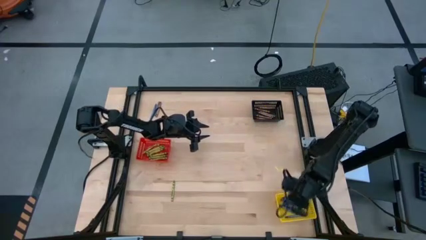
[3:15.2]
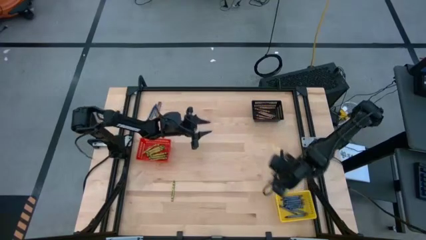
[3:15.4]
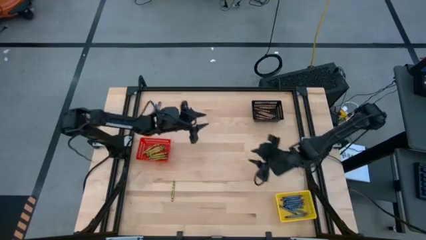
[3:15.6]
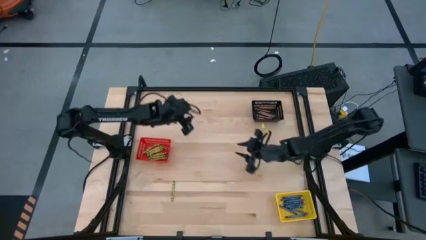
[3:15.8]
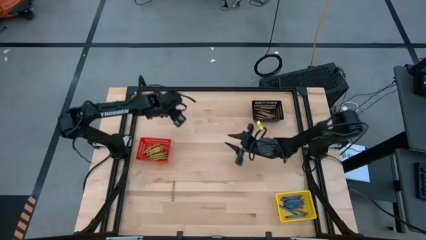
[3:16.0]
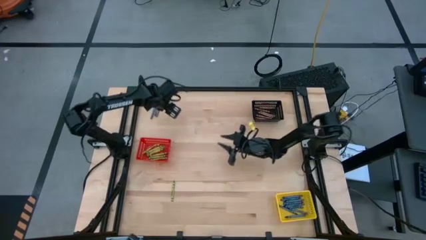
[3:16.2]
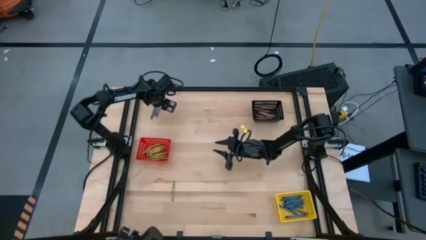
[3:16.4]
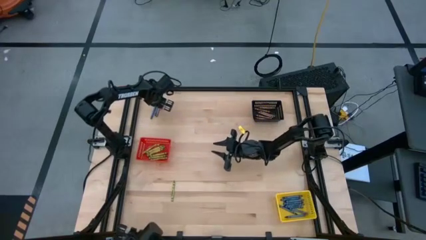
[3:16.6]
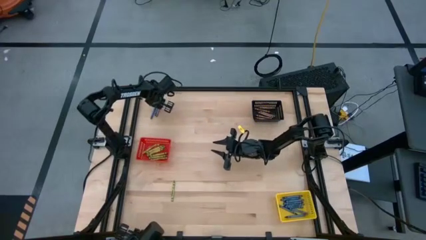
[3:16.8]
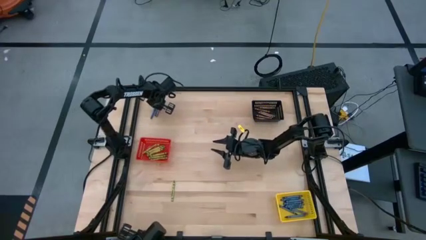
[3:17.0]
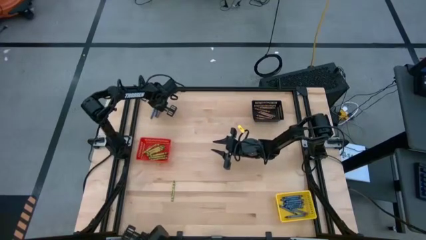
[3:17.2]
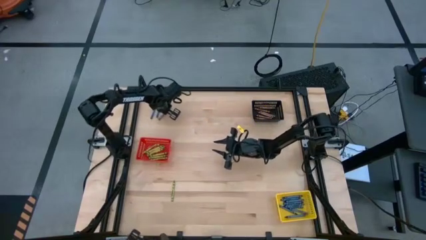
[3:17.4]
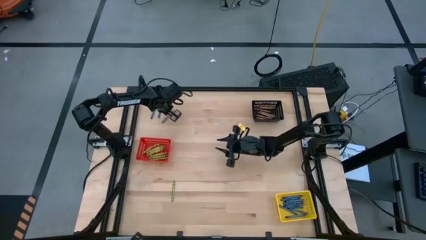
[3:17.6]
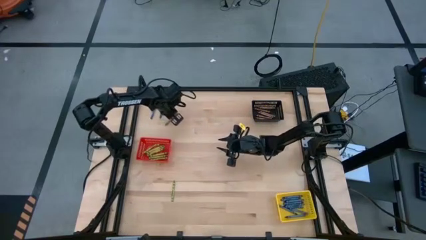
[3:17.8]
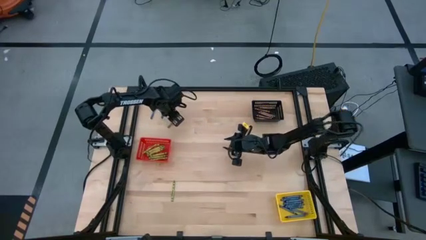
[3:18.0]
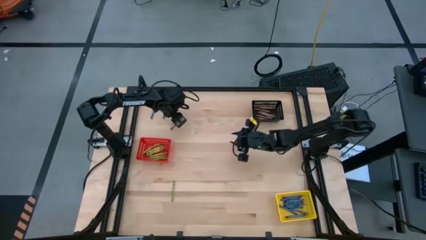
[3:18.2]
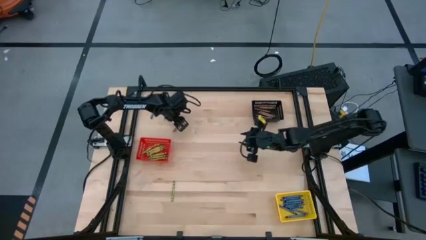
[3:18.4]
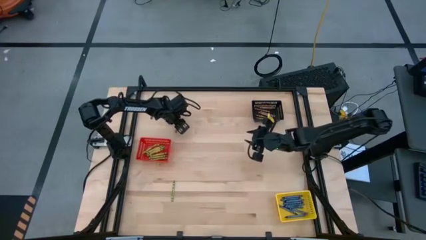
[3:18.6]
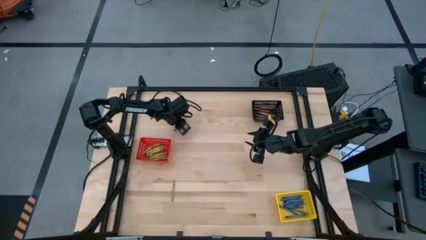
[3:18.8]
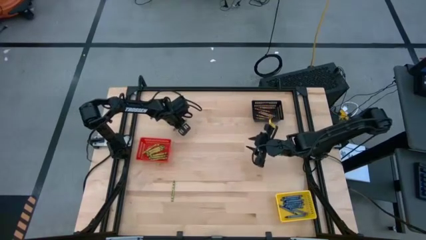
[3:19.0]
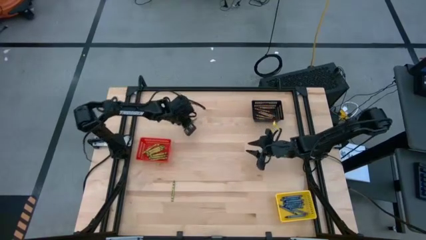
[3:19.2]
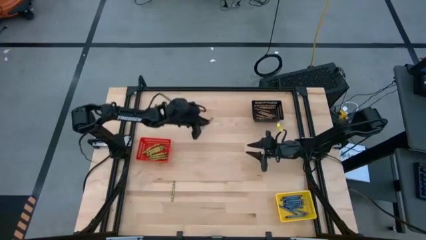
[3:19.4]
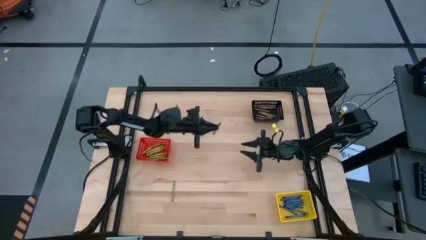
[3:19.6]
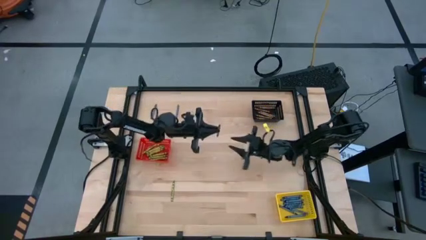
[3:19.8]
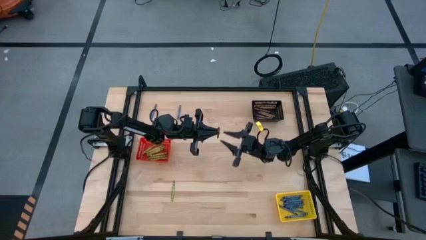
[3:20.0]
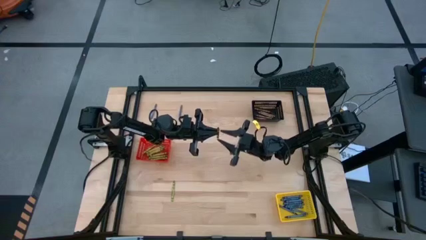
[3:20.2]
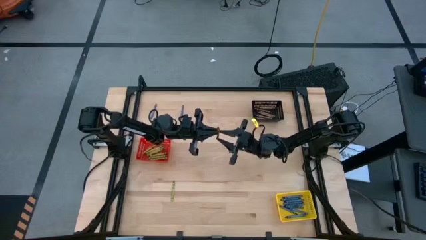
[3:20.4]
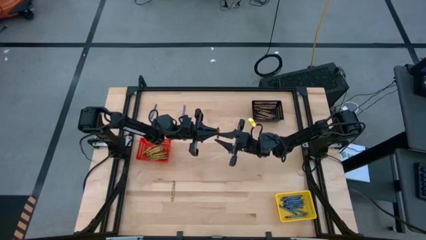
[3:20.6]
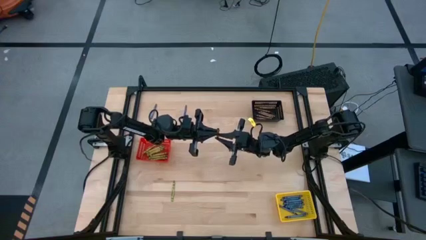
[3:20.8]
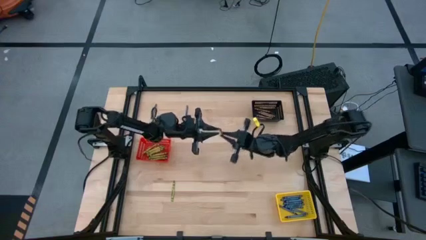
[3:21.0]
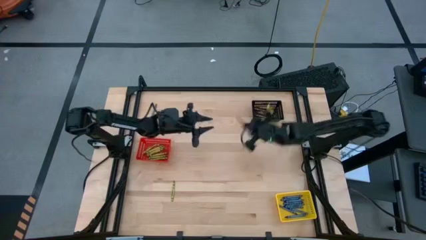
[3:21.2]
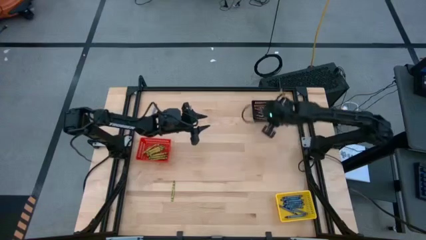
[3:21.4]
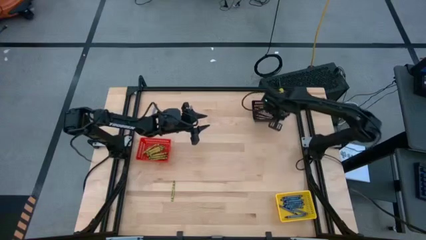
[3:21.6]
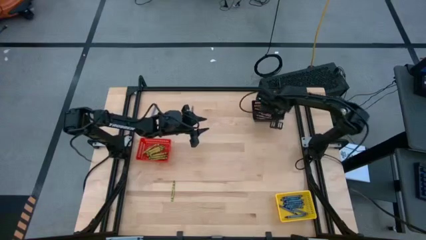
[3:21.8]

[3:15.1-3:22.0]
Task: Sort crayons
Put the brown crayon into the black bin

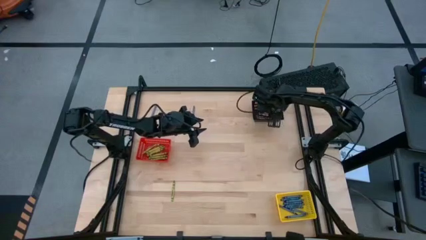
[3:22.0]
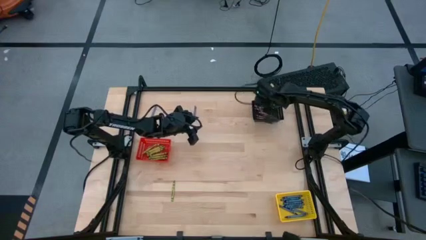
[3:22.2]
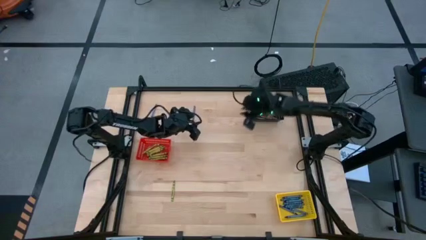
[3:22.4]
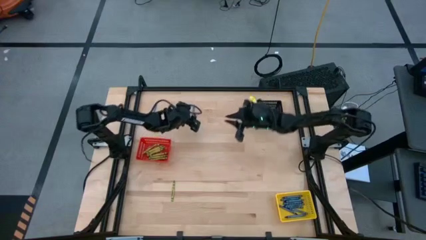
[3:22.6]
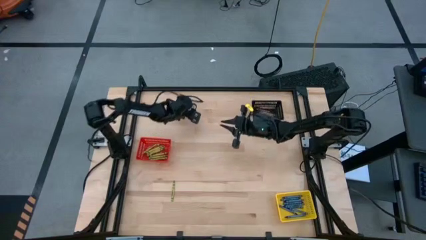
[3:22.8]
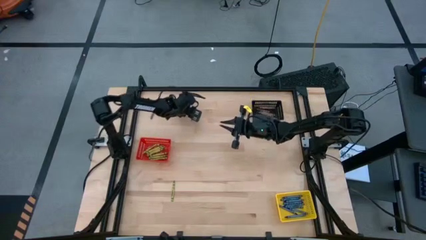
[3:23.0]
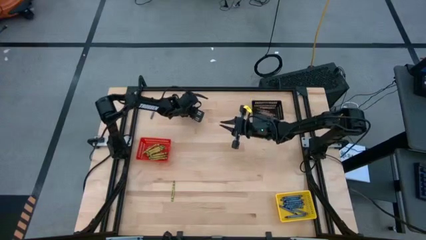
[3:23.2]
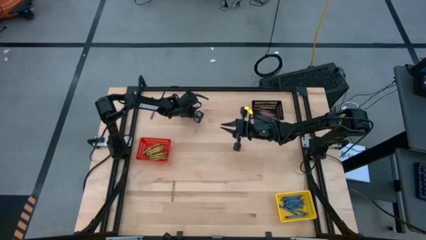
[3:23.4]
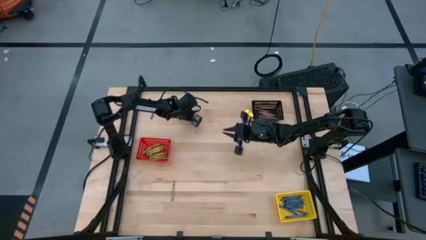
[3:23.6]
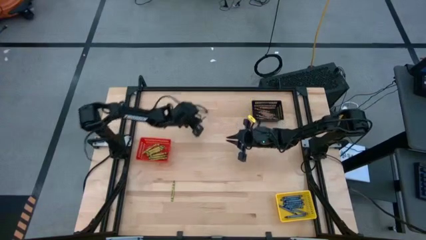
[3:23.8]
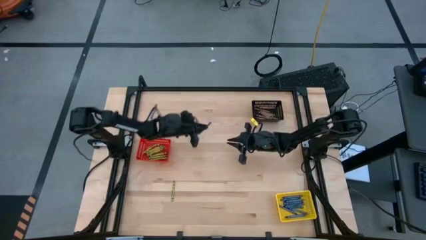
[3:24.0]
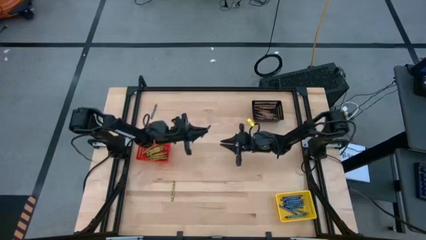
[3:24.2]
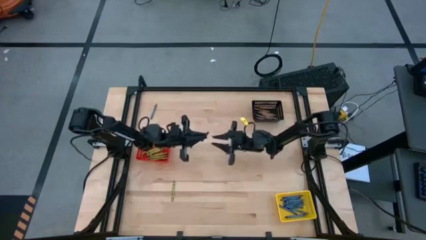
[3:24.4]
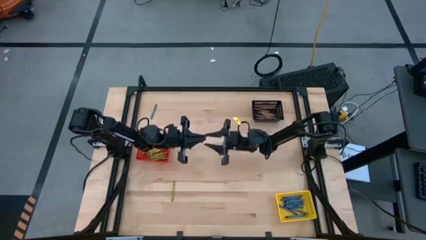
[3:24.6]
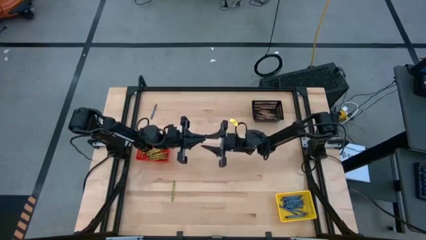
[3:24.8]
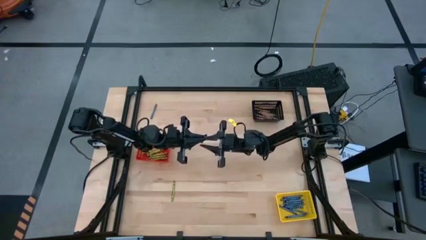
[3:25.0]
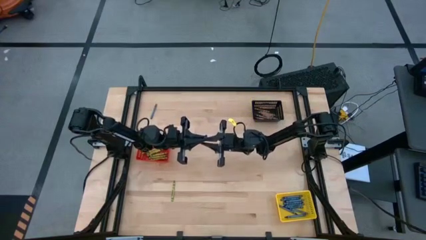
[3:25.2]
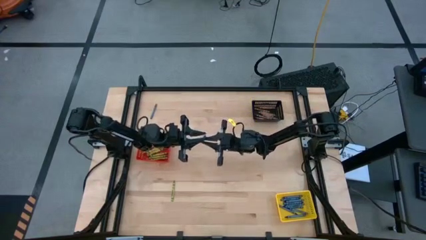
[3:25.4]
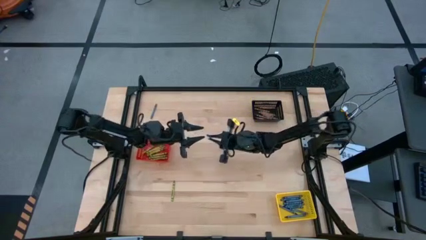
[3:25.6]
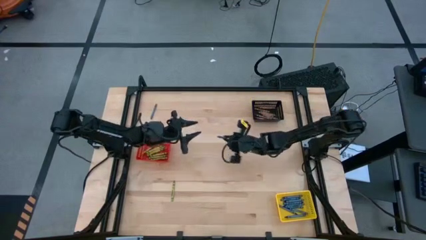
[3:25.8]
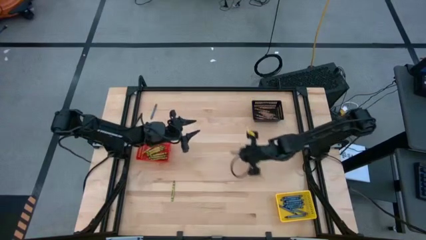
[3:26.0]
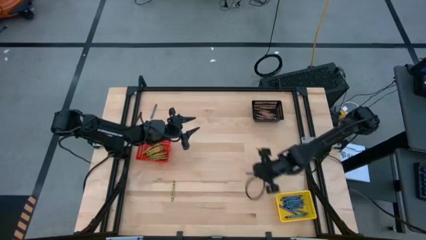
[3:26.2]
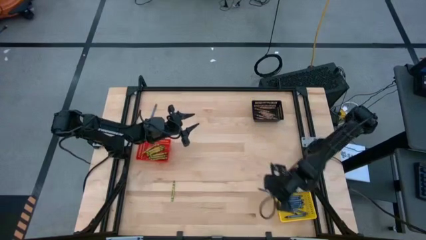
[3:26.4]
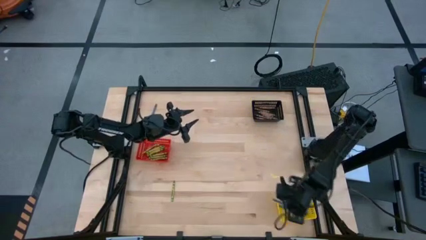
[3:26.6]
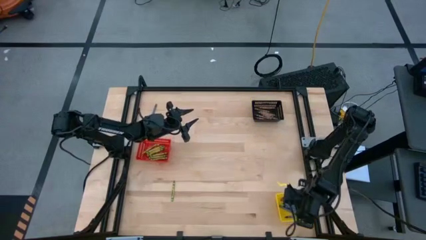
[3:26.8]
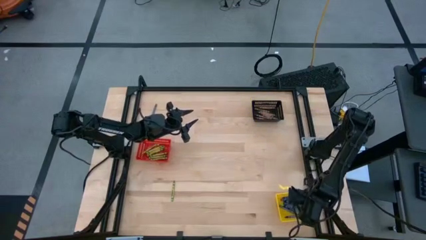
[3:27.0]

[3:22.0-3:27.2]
Put the right blue crayon into the yellow bin

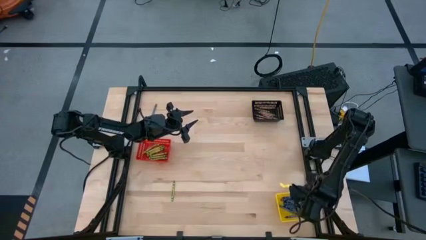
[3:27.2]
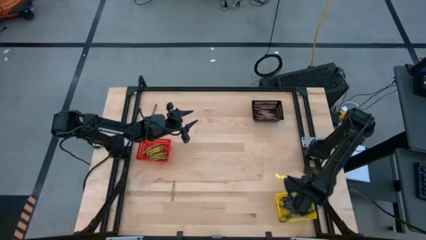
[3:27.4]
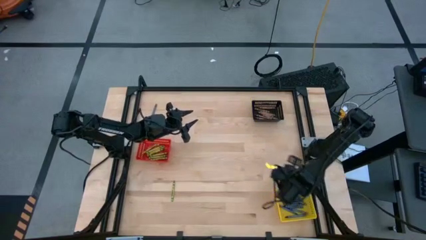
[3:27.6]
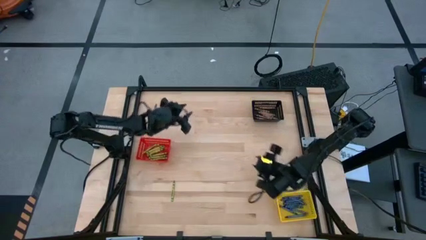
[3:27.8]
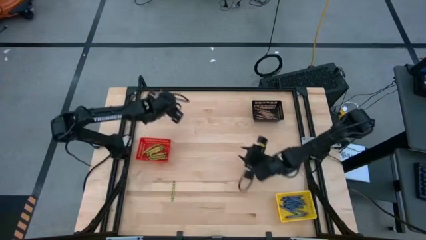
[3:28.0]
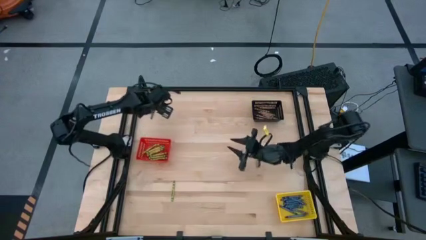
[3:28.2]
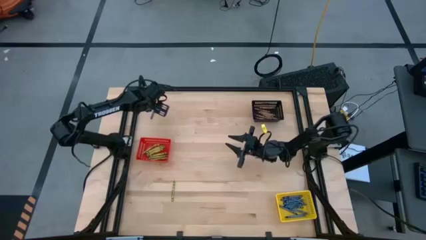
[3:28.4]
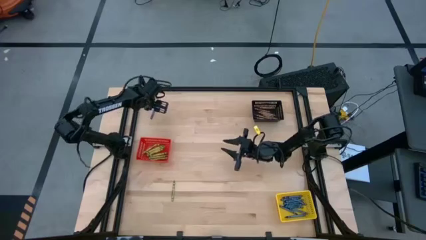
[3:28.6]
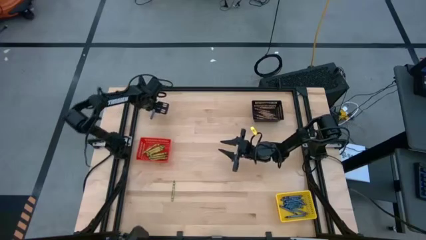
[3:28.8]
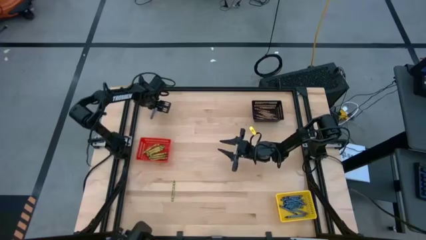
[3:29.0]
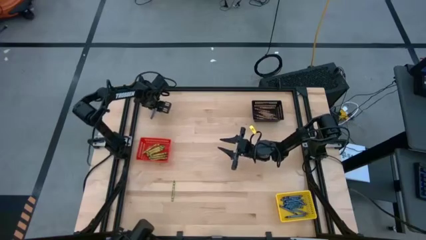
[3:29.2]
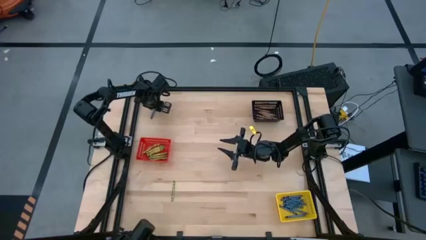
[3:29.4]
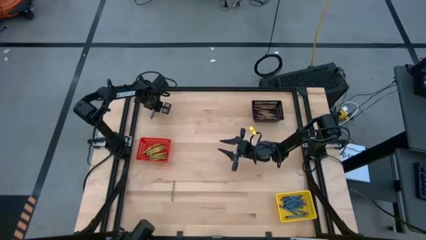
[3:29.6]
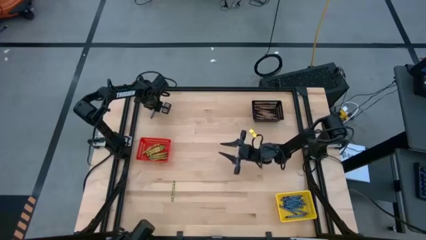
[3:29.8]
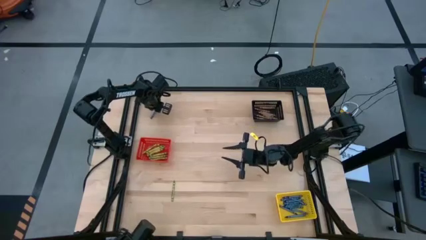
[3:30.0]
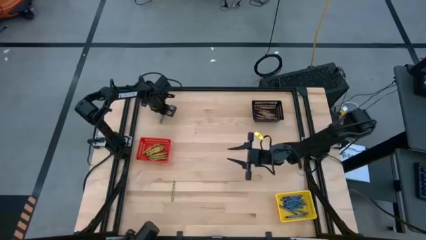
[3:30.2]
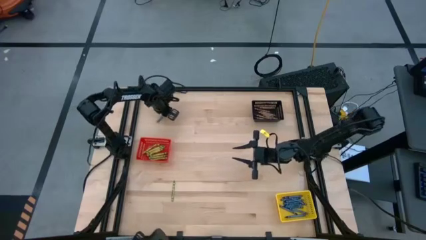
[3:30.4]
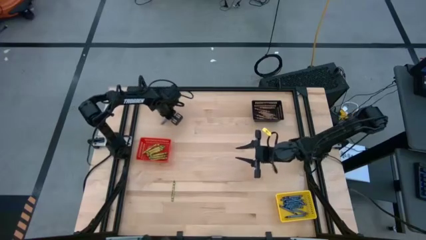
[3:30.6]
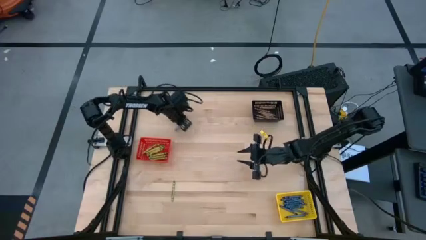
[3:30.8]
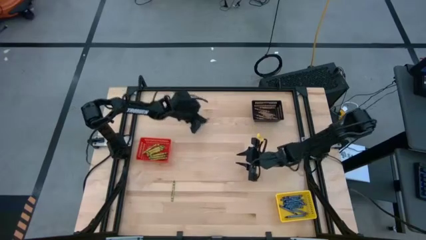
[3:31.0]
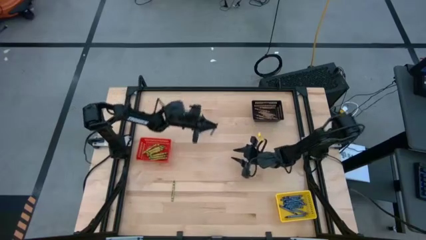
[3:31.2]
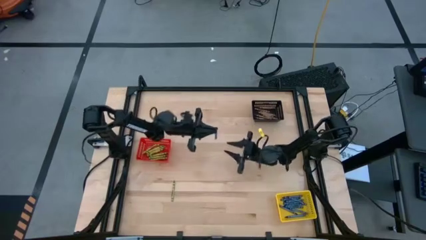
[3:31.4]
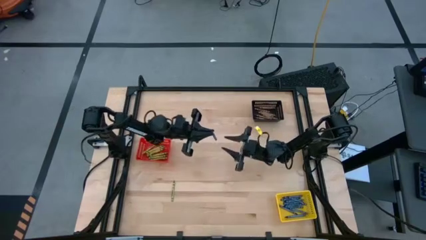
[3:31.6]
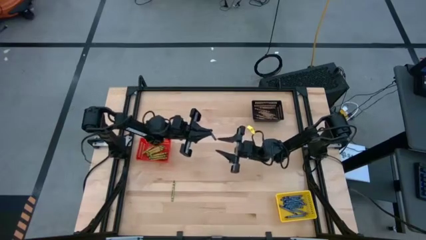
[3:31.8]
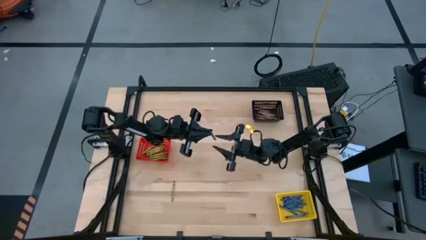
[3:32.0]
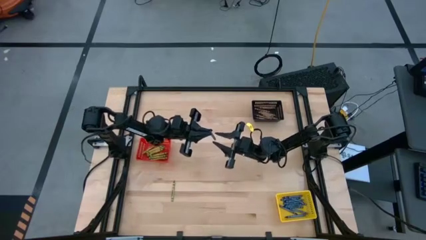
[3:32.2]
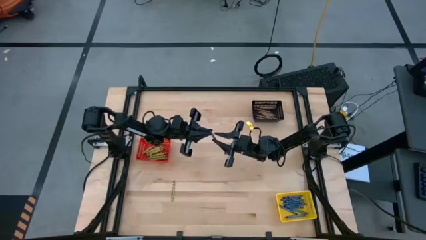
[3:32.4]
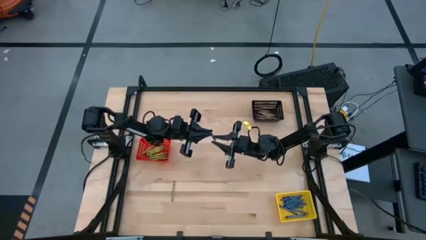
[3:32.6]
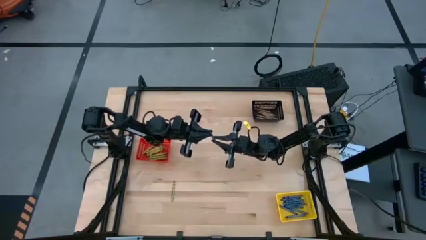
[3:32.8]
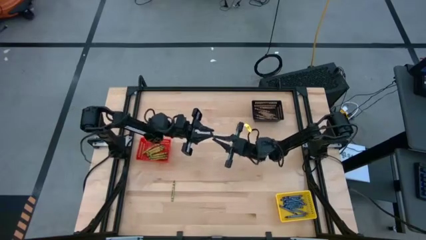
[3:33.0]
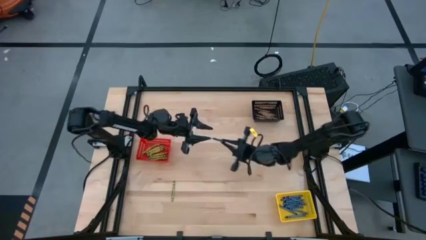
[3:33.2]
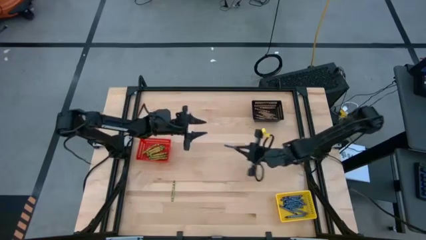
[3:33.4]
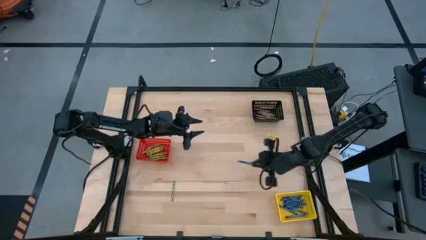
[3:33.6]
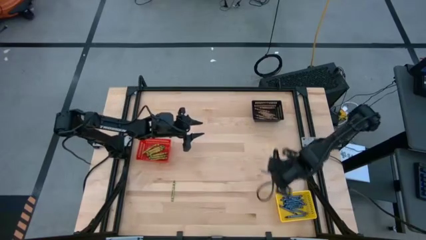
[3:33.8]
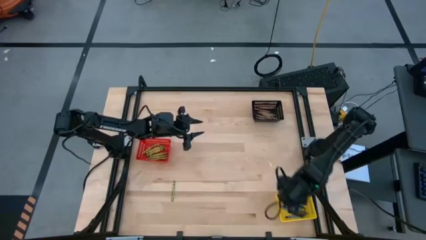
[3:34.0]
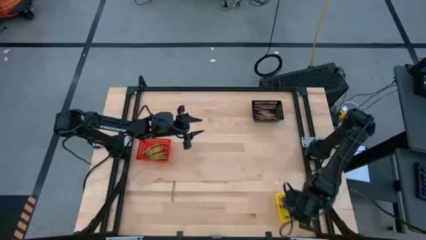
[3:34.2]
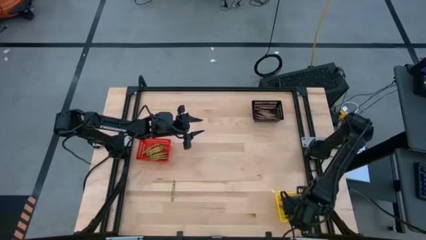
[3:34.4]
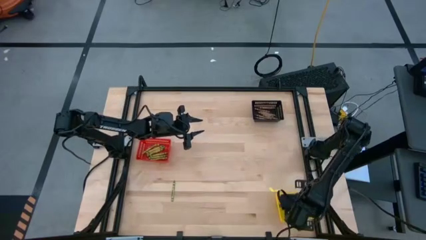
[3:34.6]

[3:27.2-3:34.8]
Put the blue crayon into the yellow bin
